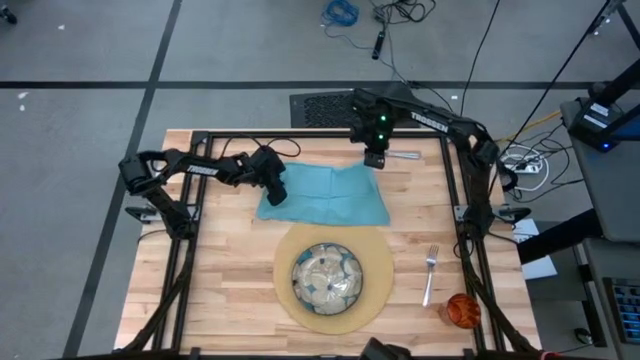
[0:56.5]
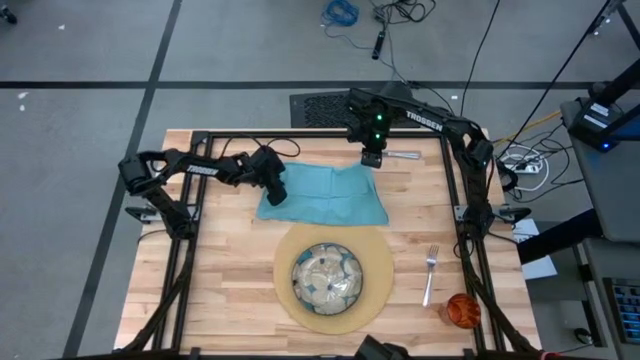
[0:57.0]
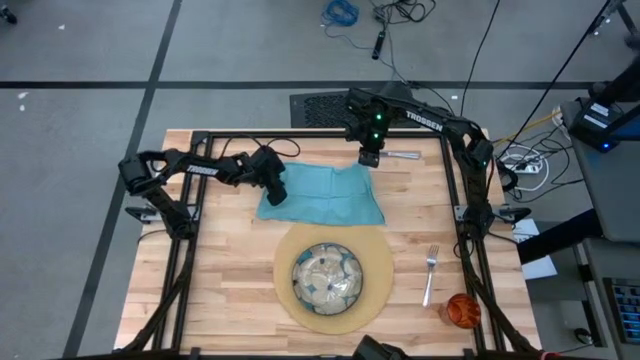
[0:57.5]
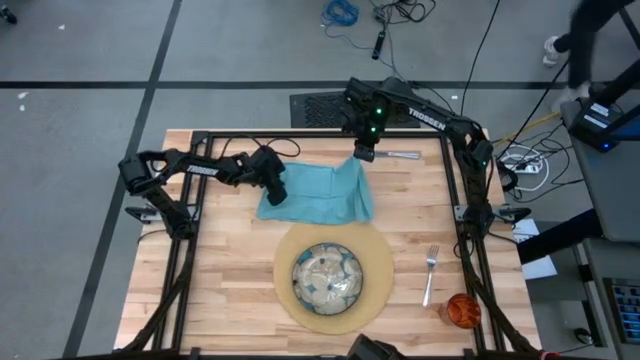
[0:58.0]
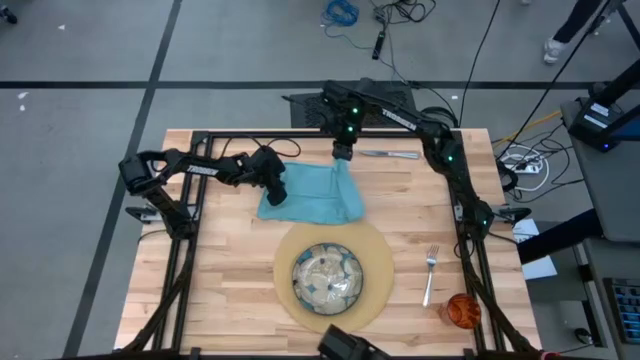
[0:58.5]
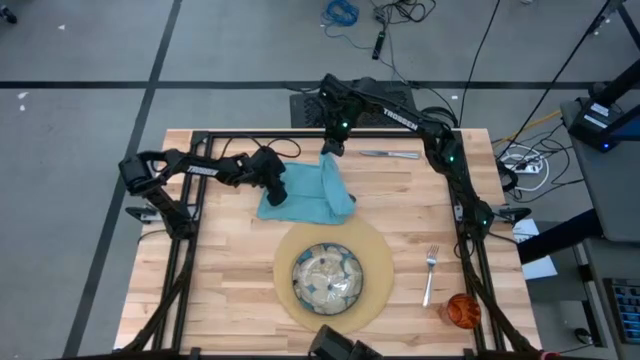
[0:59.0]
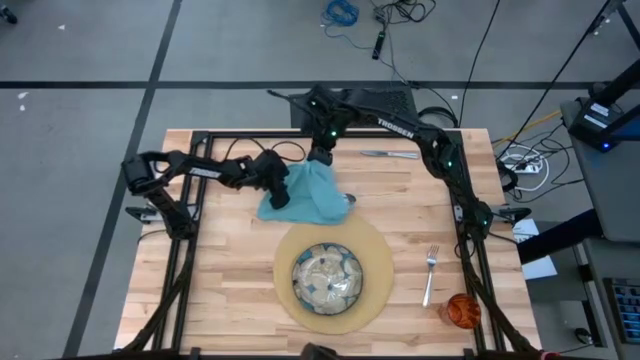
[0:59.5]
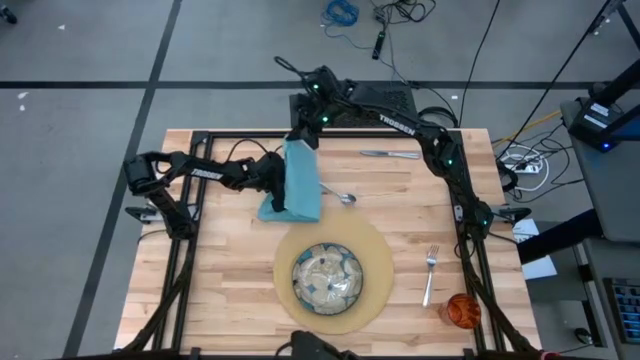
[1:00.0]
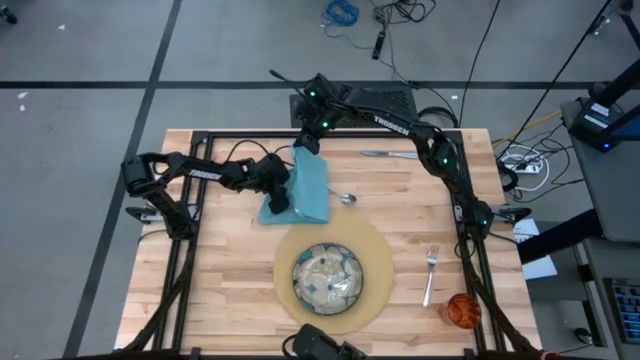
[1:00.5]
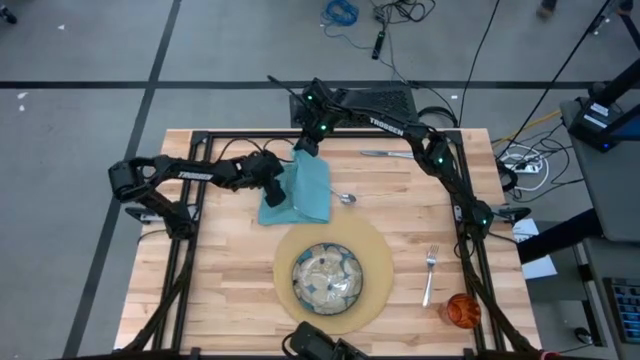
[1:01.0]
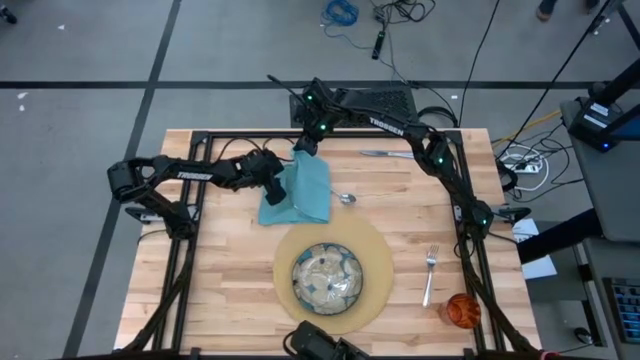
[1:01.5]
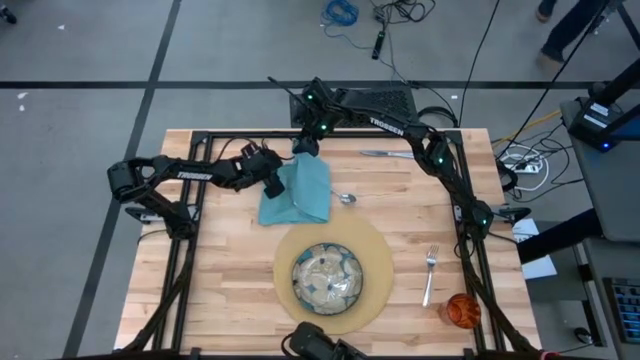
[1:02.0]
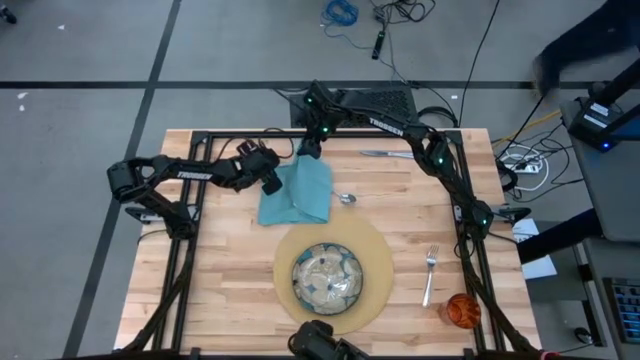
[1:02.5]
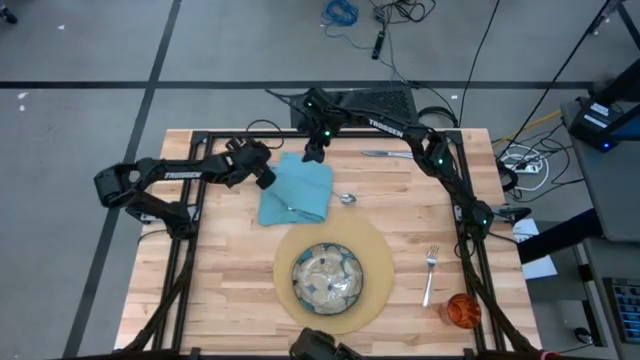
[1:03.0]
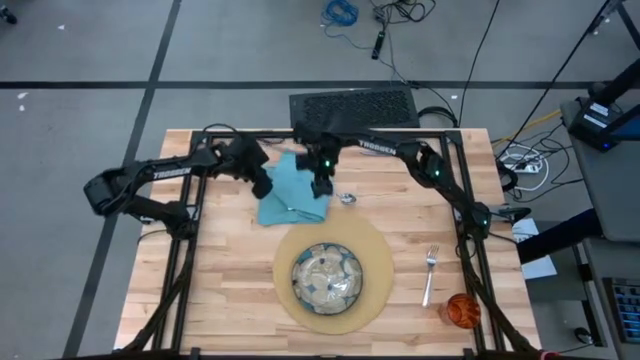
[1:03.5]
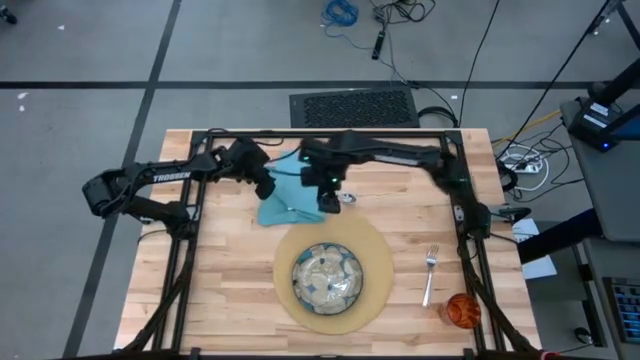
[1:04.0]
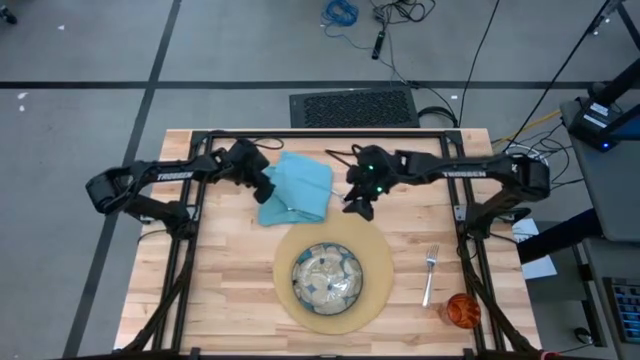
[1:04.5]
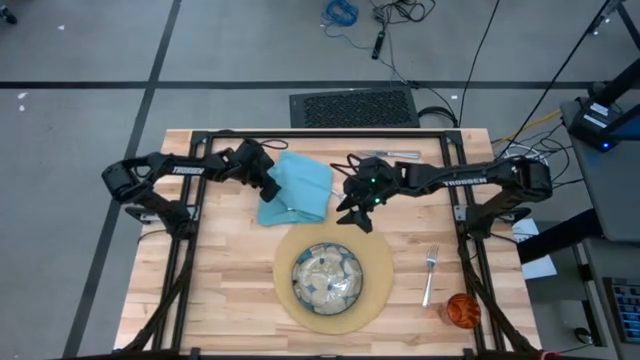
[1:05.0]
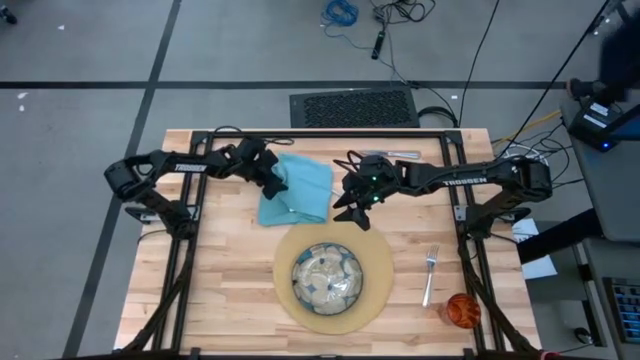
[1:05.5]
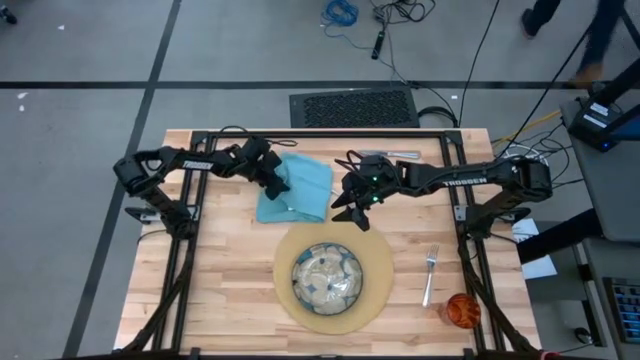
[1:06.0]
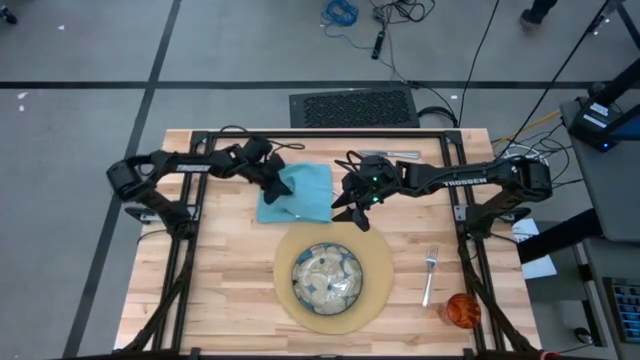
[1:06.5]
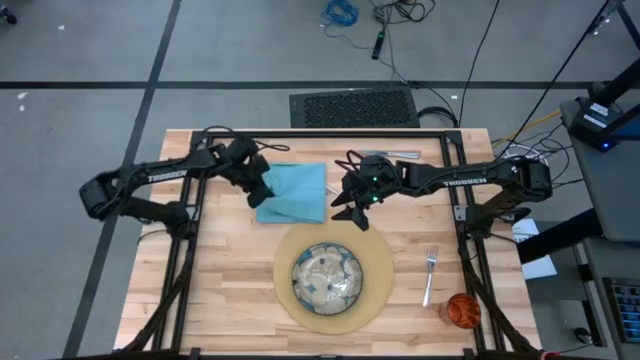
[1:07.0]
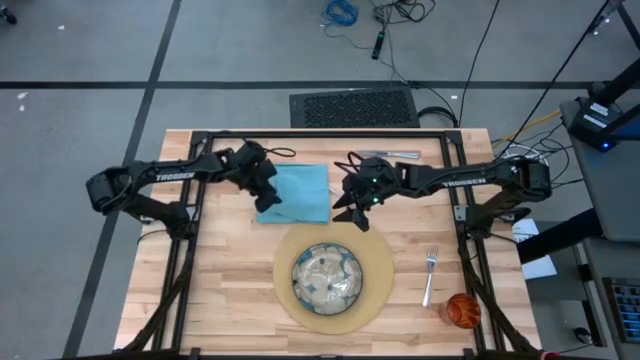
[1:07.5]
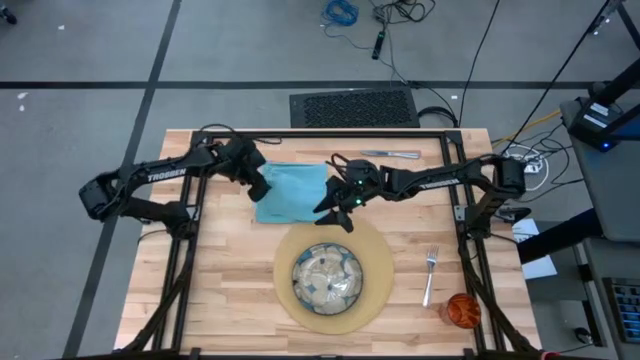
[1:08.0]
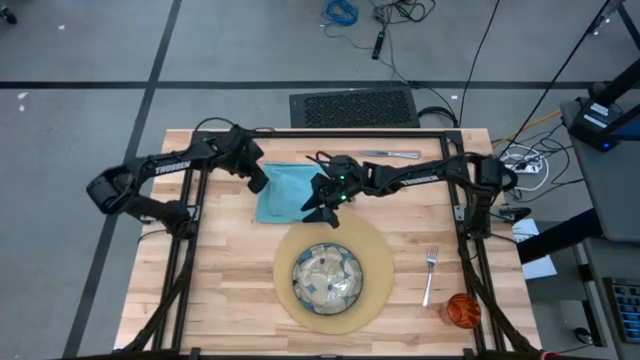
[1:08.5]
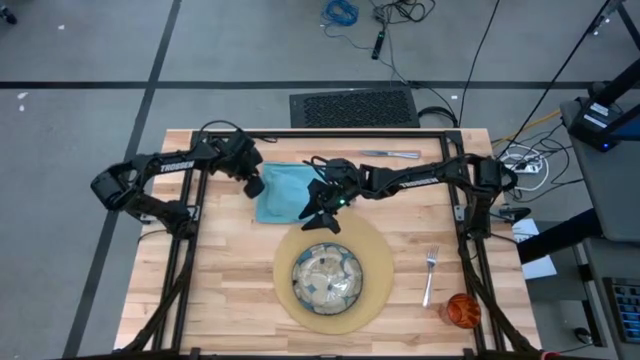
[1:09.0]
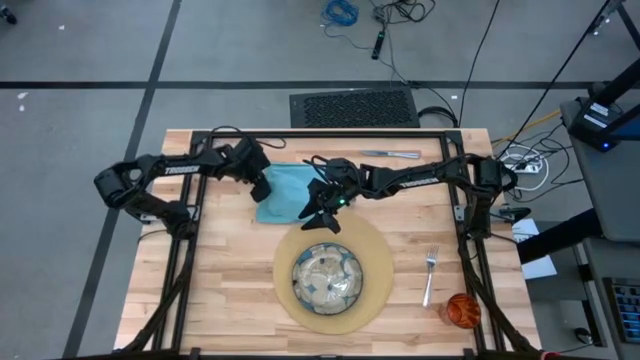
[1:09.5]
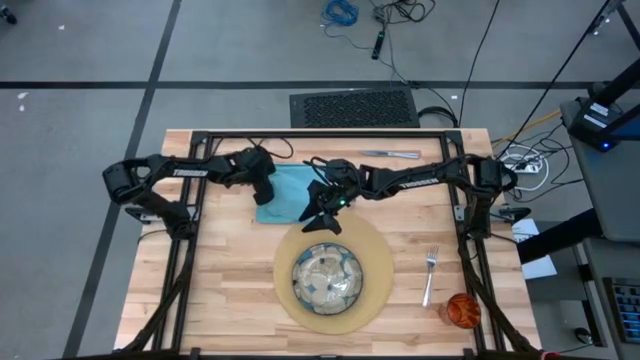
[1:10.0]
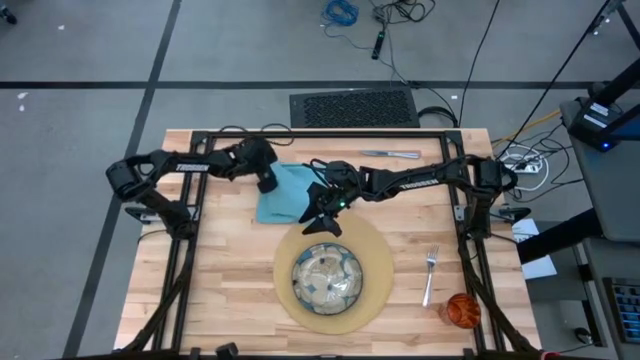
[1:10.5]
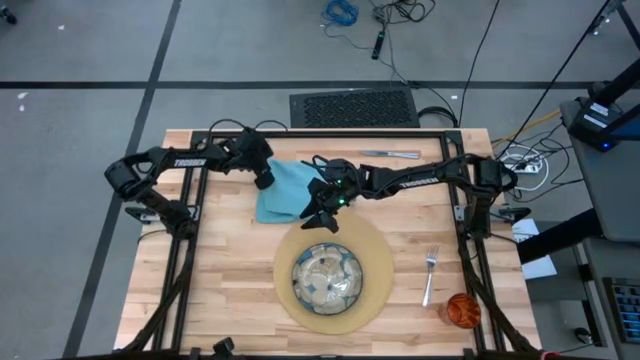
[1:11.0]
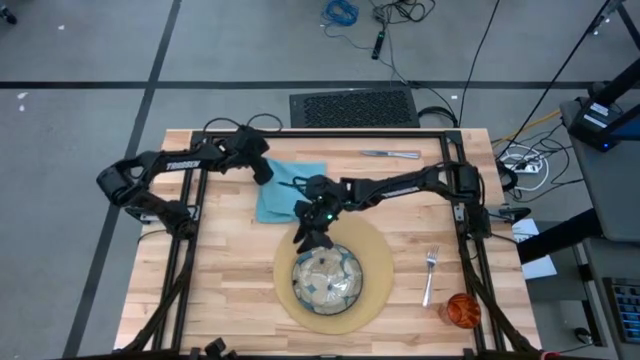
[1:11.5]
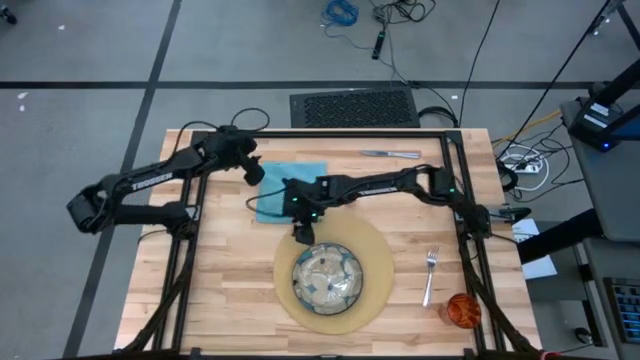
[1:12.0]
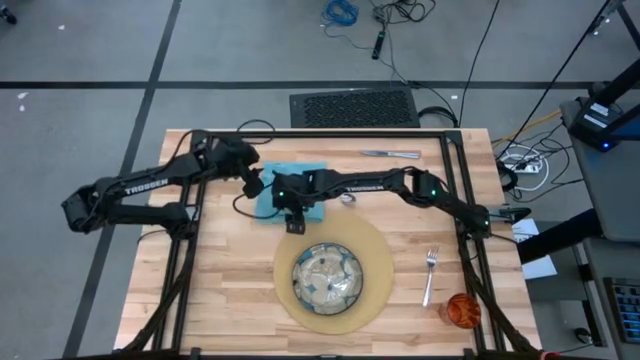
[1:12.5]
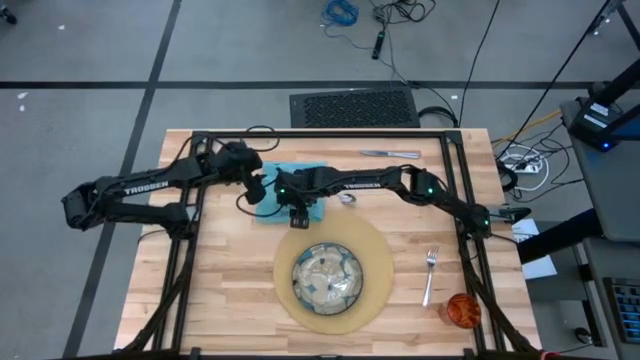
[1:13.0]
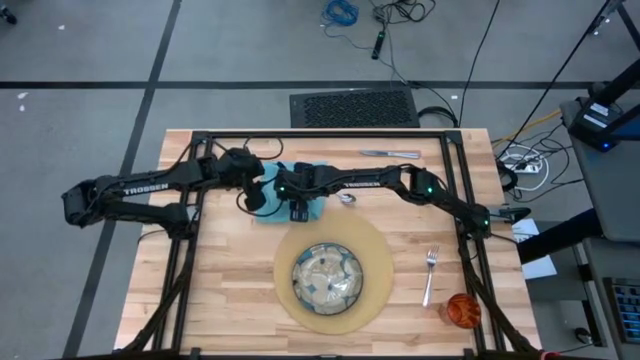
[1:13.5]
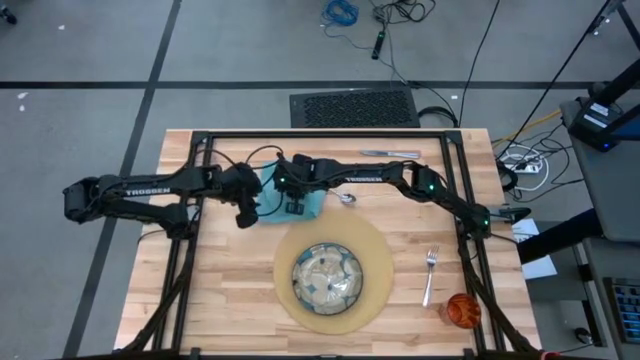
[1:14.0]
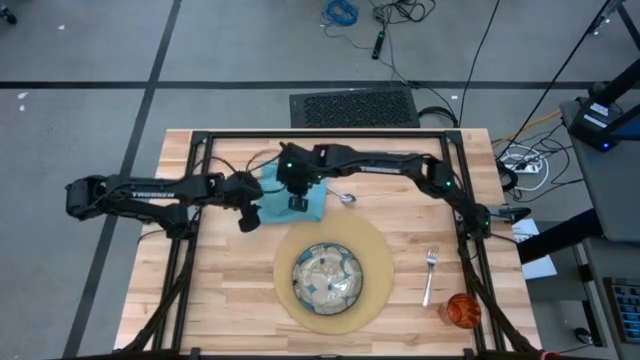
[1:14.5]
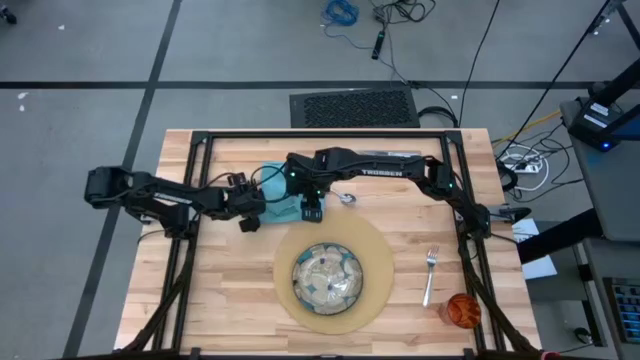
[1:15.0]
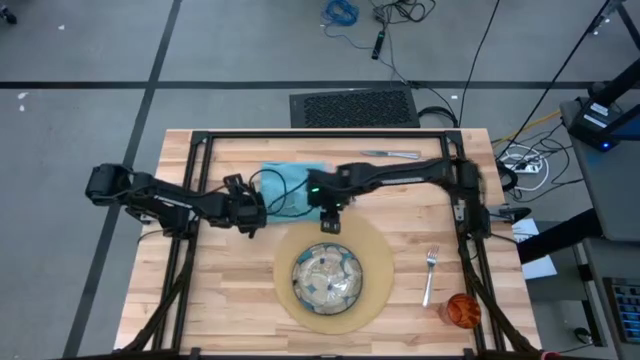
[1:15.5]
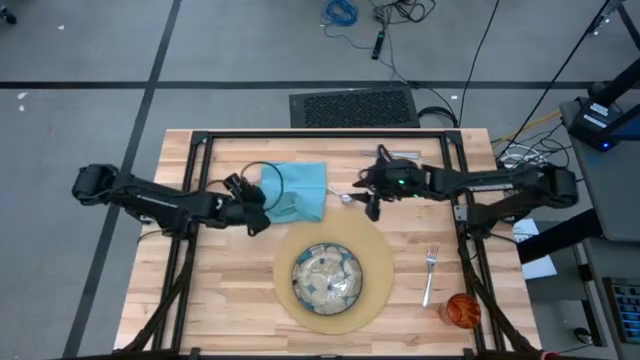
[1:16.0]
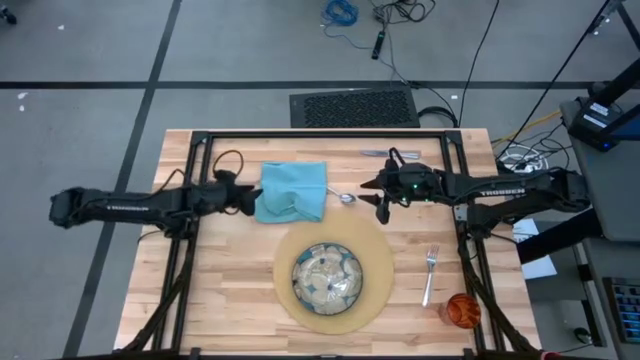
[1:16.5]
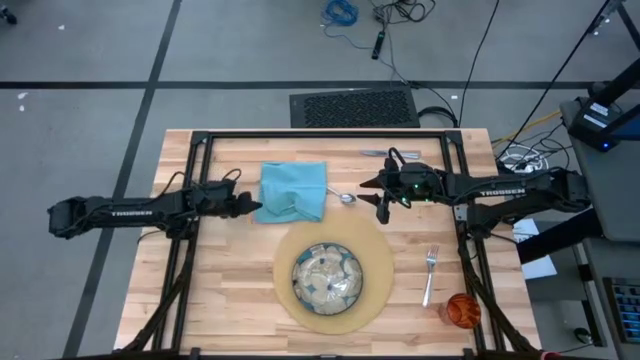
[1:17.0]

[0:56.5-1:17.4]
Task: Set table place
Fold the blue napkin
